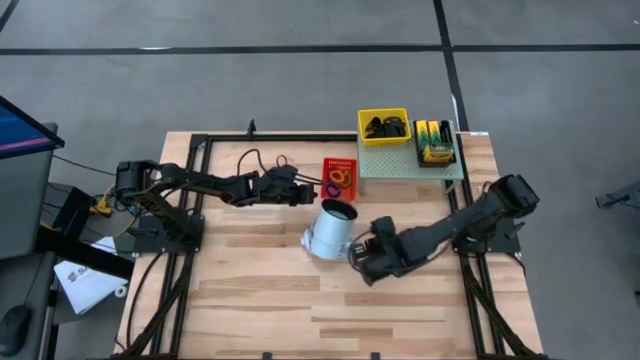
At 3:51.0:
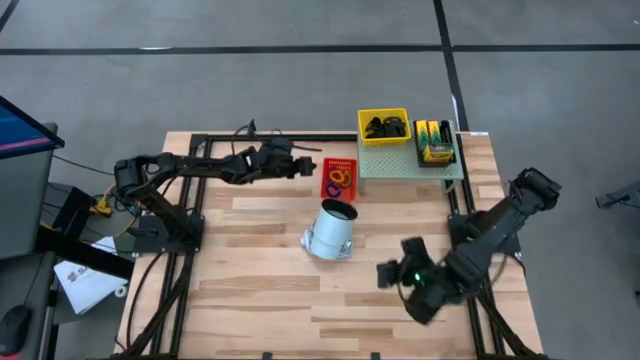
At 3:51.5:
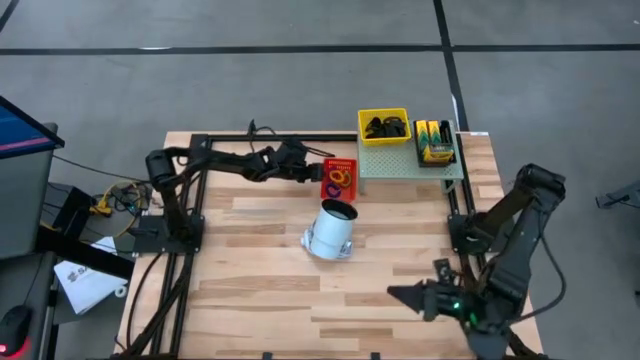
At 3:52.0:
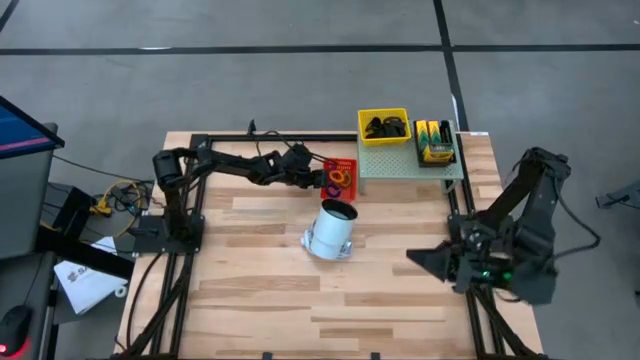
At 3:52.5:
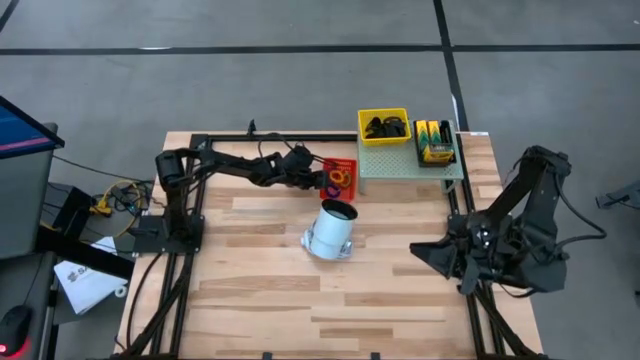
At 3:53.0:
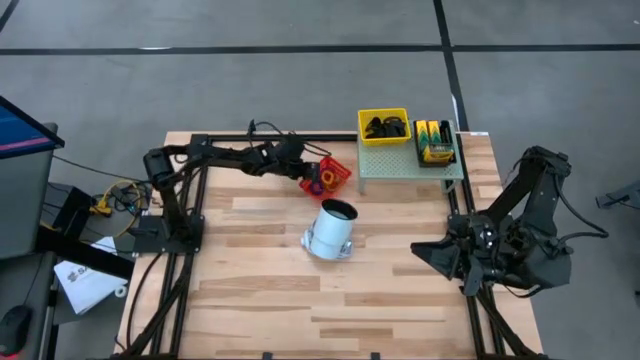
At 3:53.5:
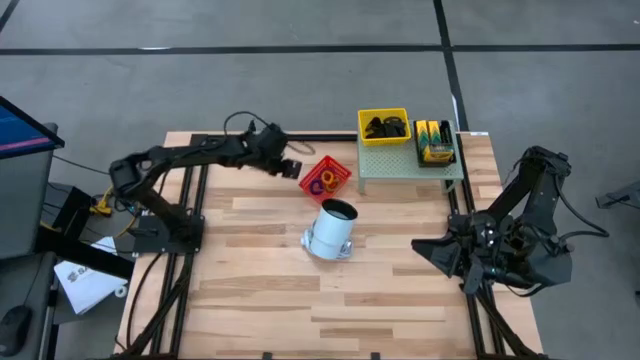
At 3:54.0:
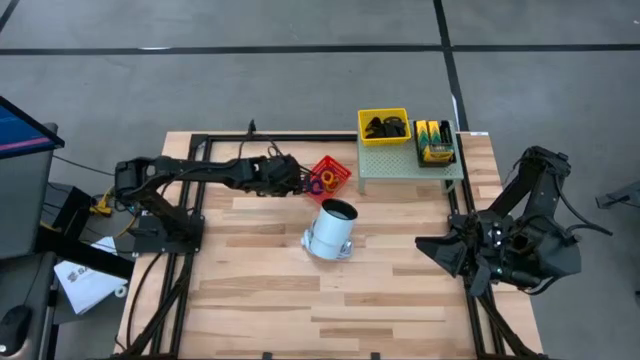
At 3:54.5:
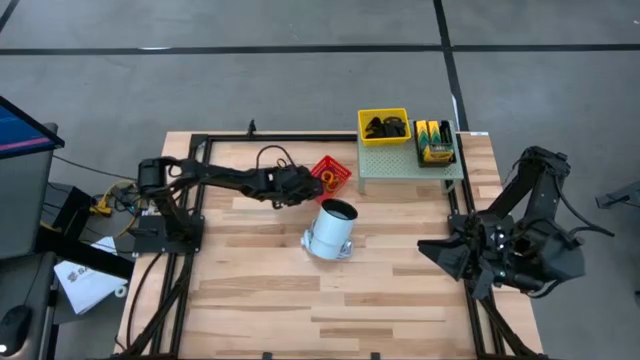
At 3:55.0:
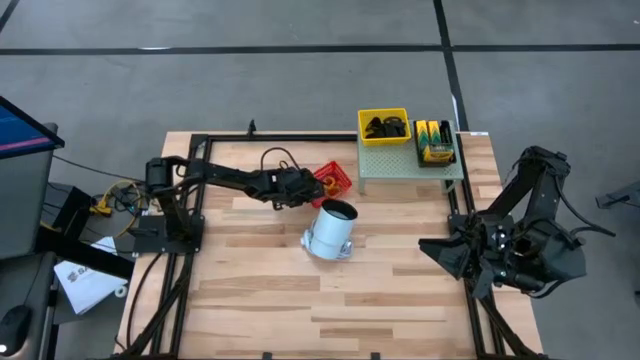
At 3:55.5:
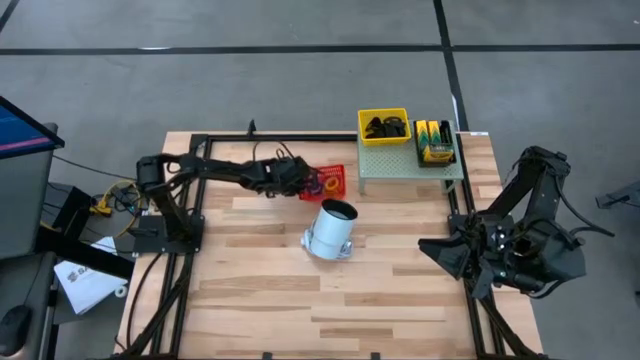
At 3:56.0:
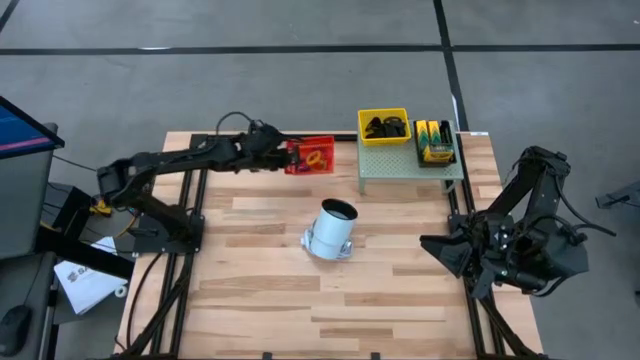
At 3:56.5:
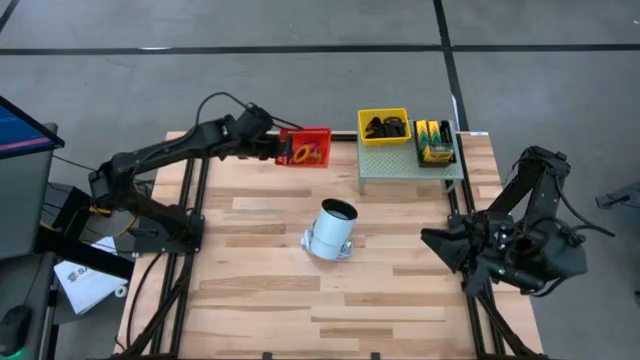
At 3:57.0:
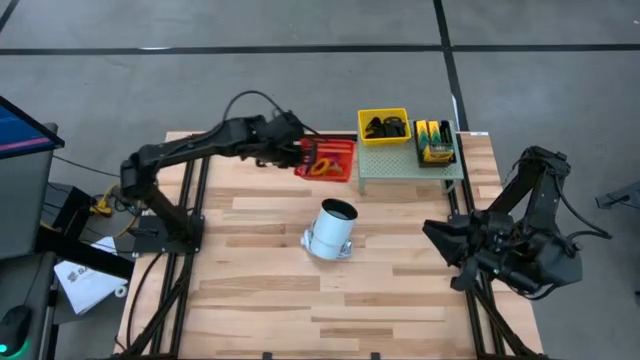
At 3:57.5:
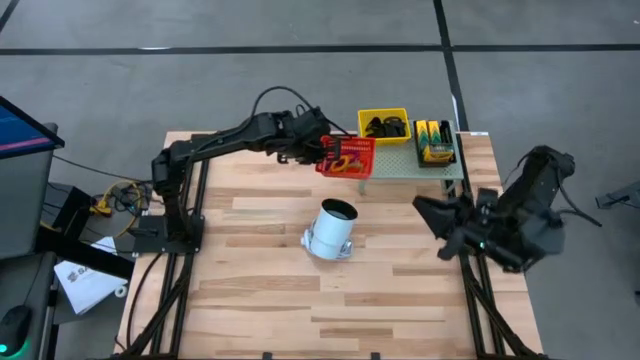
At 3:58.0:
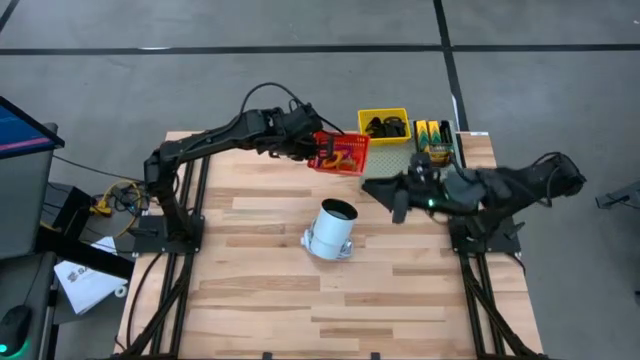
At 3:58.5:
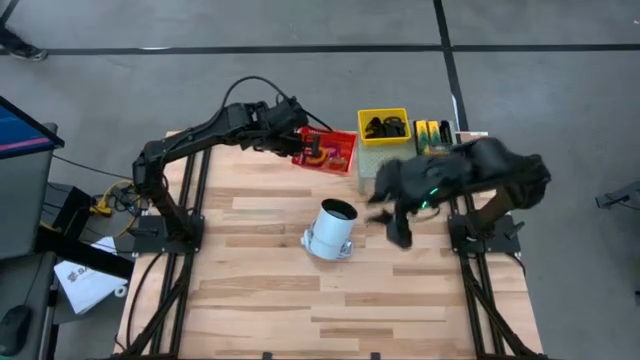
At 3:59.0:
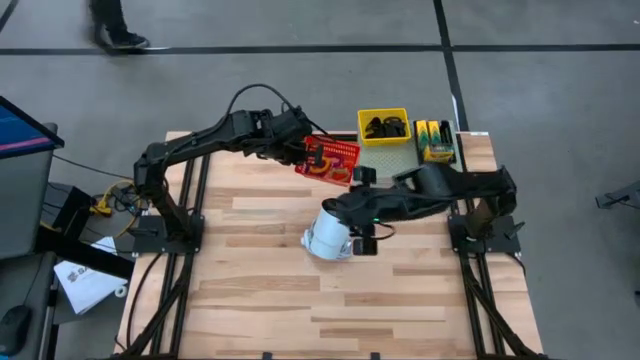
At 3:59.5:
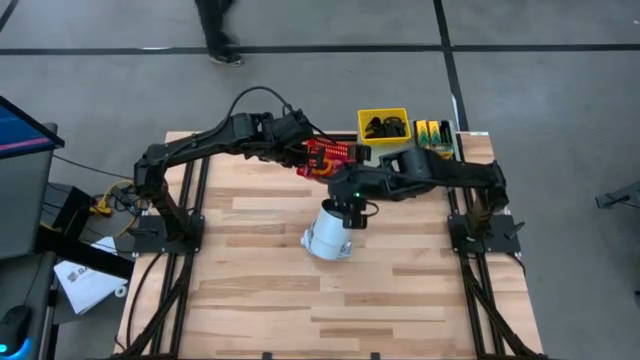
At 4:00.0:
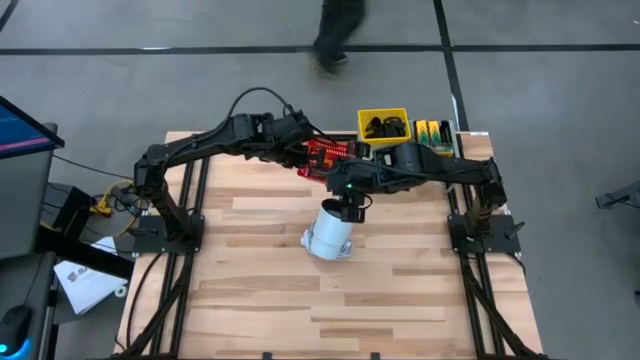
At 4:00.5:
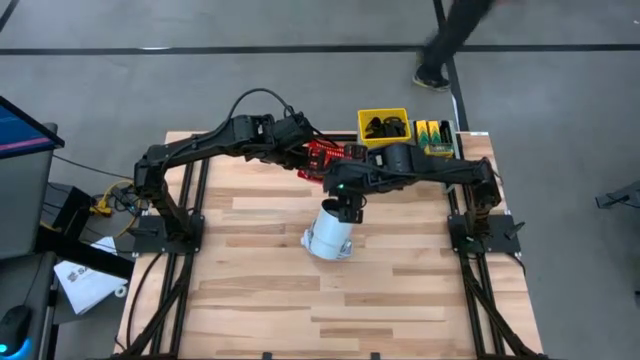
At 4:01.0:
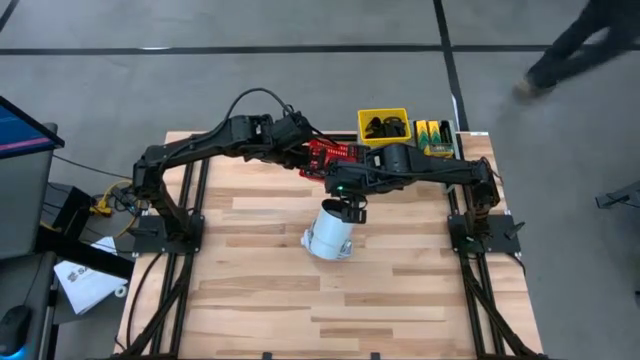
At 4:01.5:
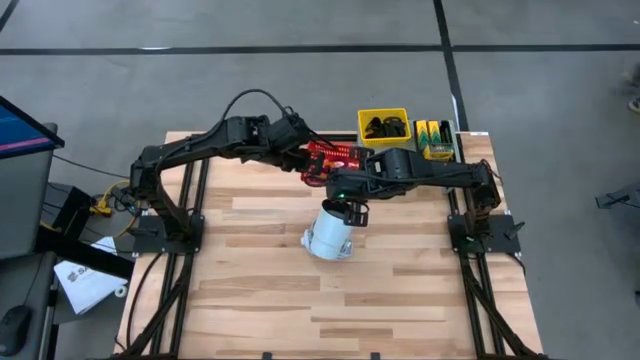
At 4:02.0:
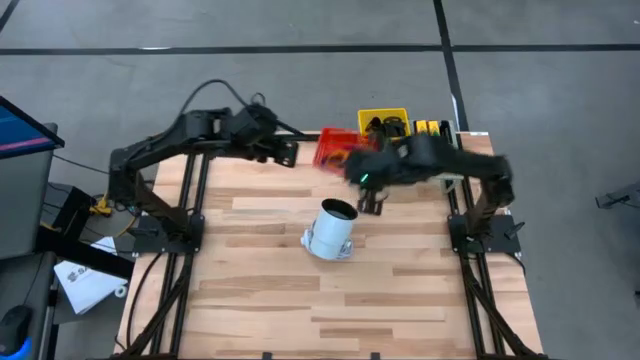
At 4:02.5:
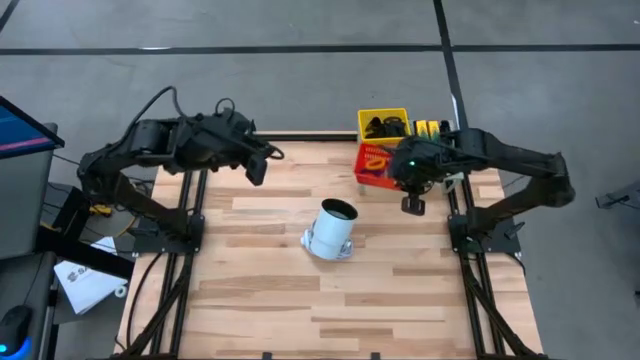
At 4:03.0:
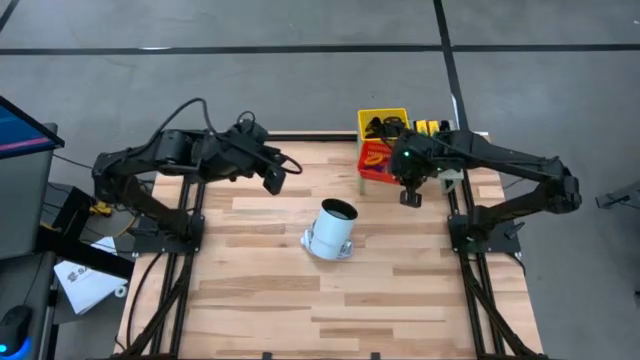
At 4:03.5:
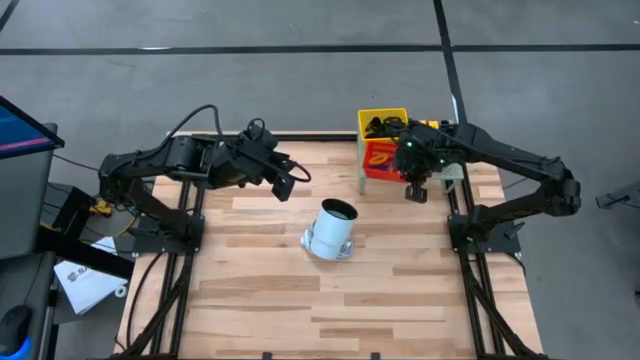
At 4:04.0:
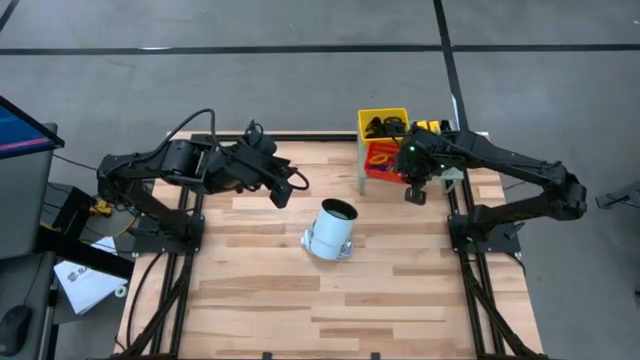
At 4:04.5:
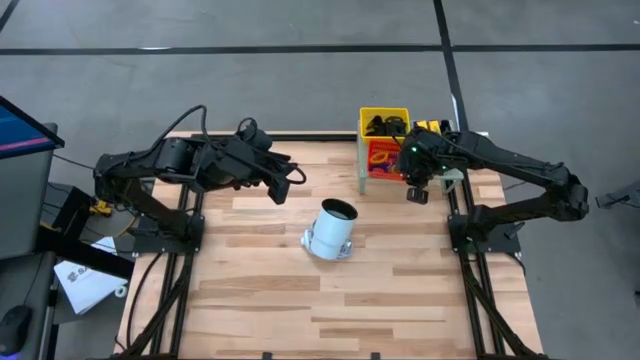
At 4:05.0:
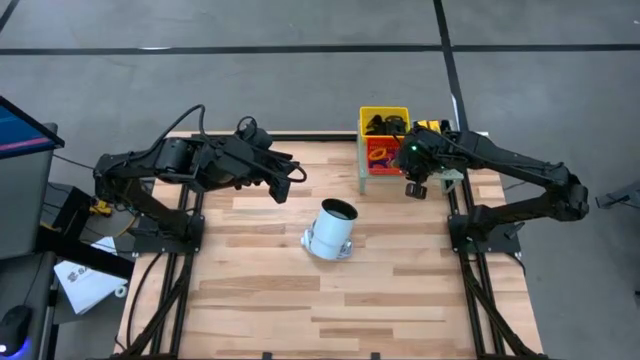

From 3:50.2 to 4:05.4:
Task: Pick & Place Office Desk Supplies
Put the red bin on the shelf

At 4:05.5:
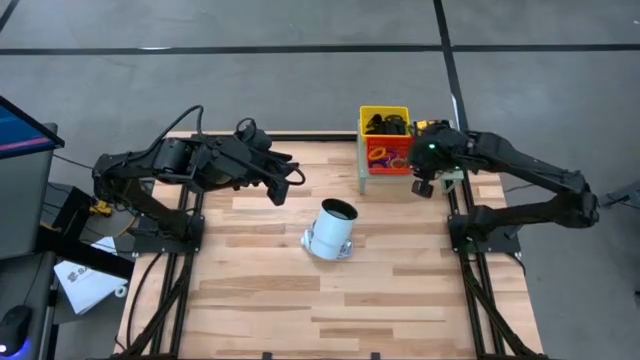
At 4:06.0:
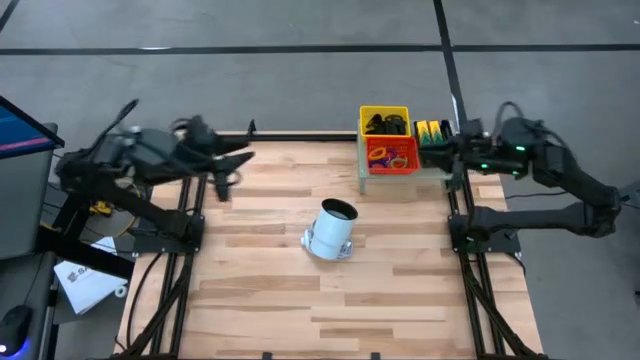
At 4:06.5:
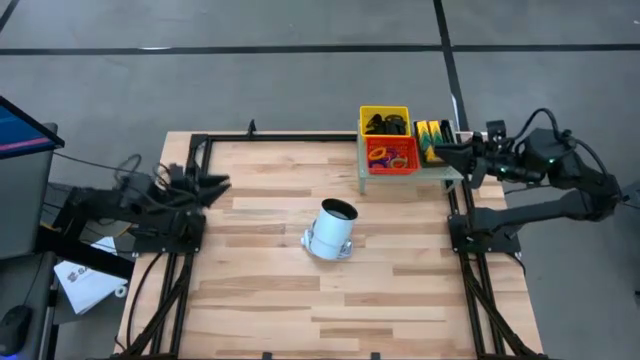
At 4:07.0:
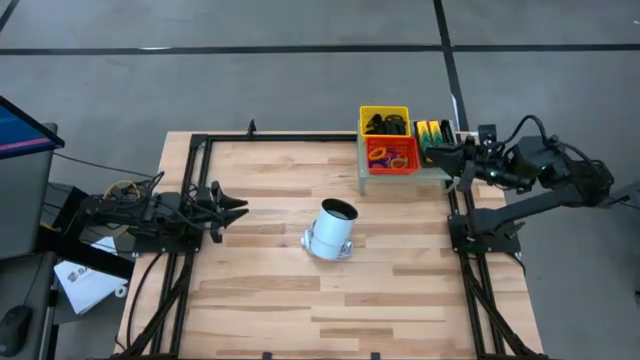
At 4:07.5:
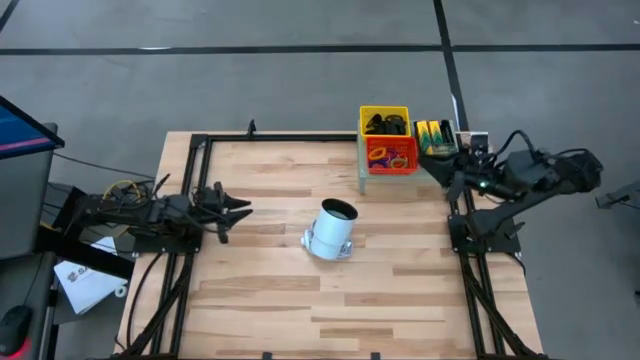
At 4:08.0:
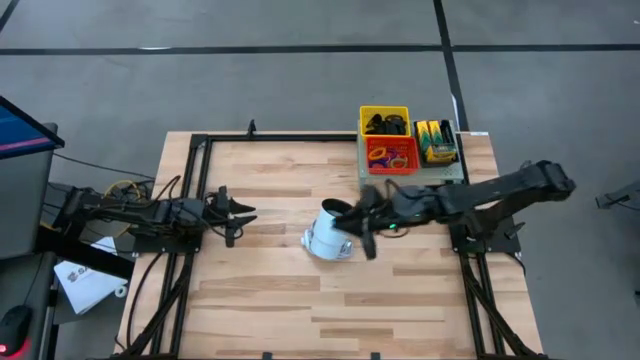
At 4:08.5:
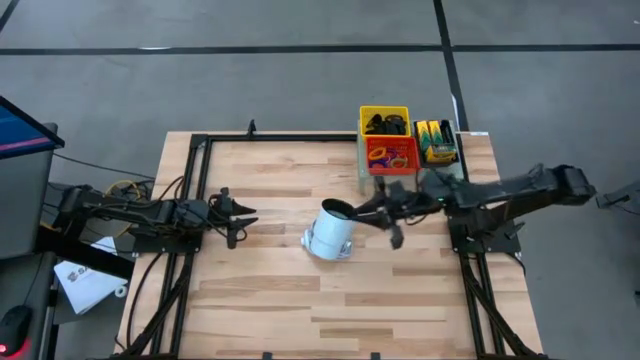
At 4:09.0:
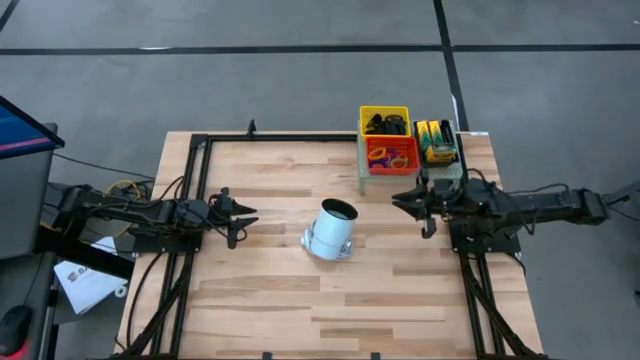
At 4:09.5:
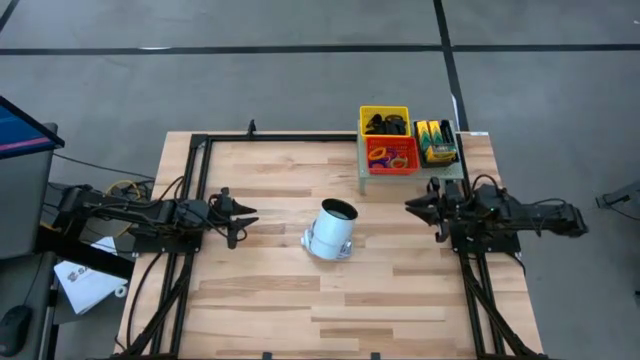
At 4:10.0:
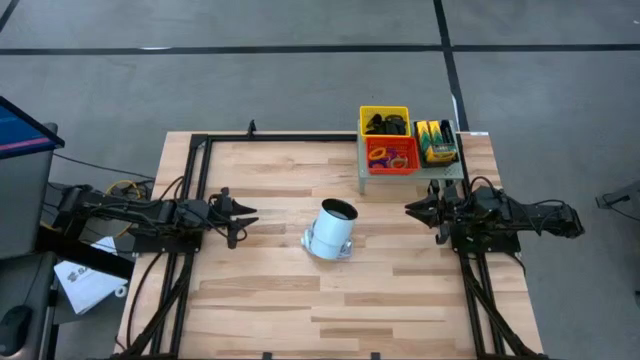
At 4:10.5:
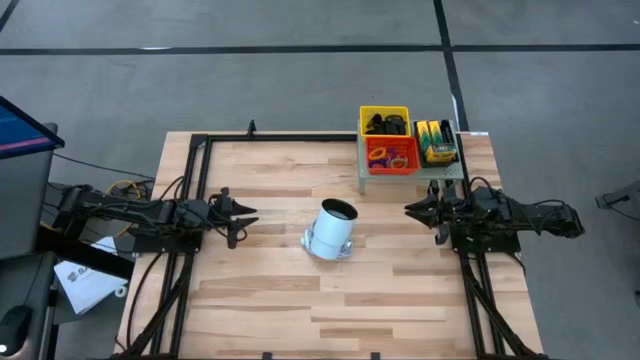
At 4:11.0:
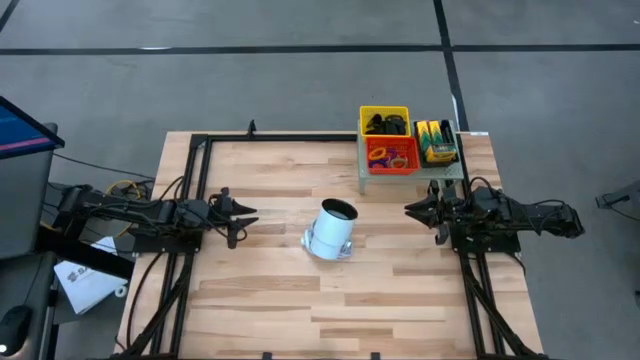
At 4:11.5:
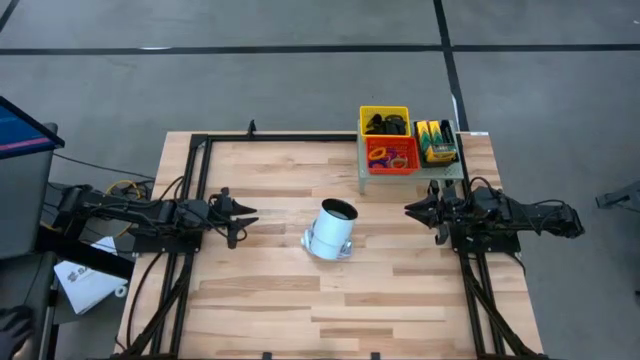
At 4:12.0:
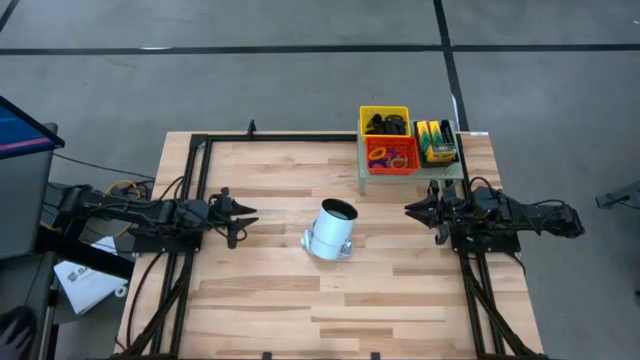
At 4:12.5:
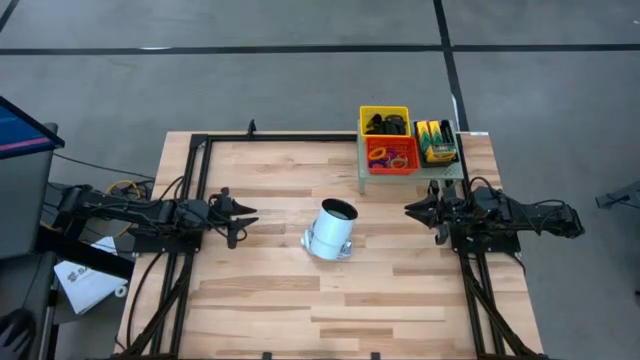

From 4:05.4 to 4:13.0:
Return to Home Position
